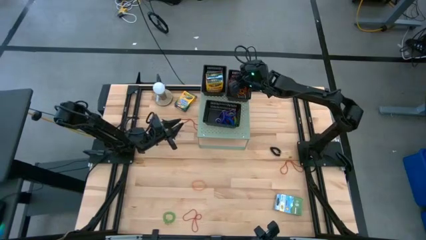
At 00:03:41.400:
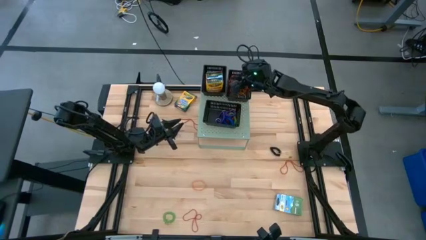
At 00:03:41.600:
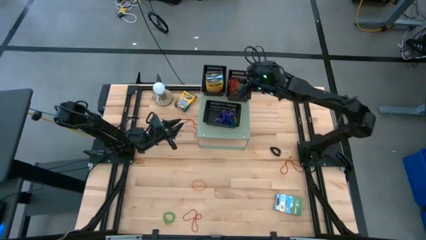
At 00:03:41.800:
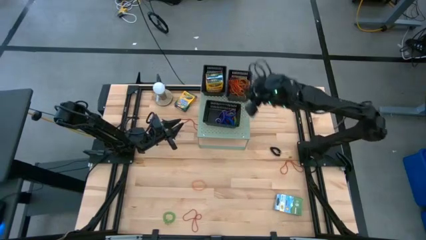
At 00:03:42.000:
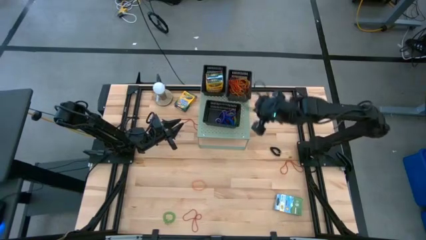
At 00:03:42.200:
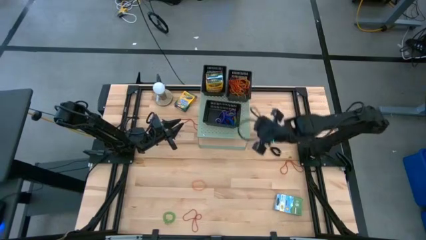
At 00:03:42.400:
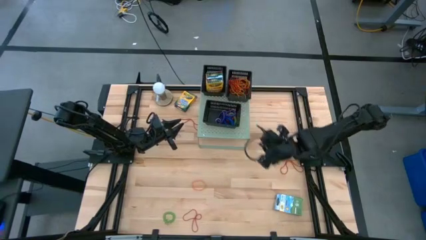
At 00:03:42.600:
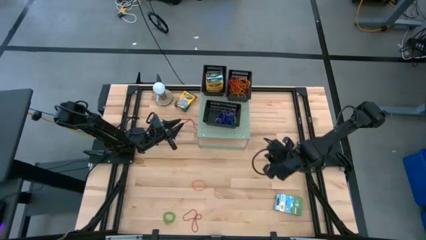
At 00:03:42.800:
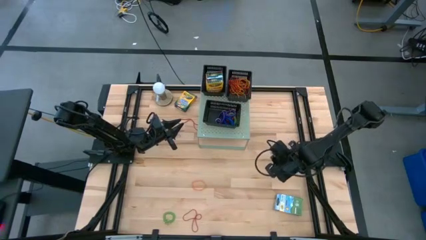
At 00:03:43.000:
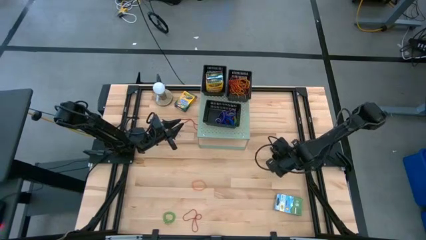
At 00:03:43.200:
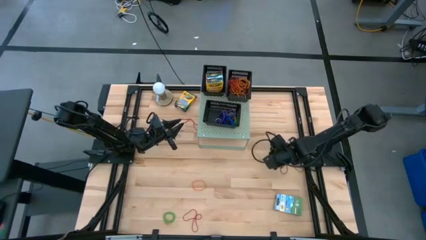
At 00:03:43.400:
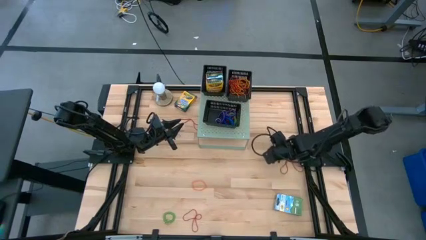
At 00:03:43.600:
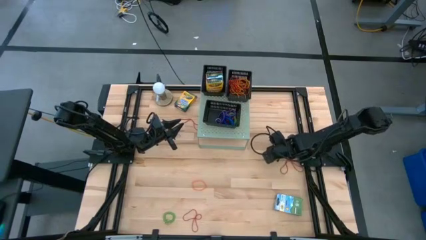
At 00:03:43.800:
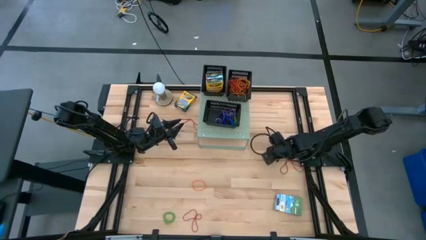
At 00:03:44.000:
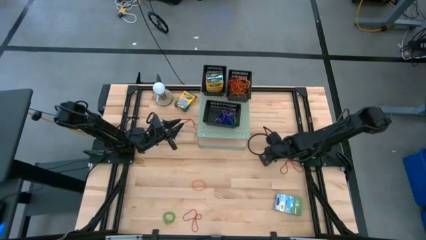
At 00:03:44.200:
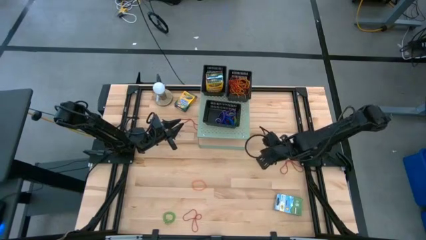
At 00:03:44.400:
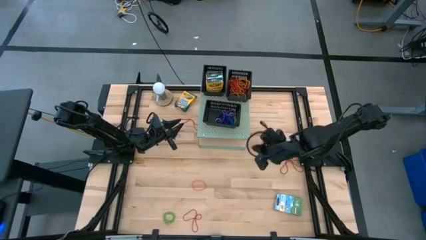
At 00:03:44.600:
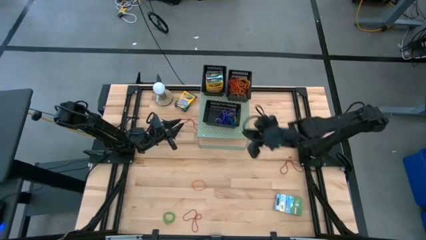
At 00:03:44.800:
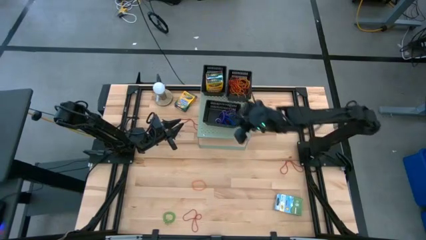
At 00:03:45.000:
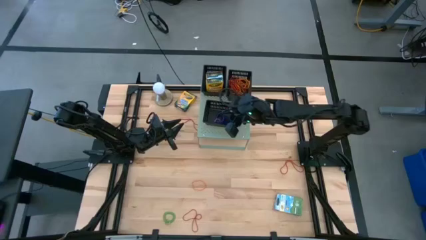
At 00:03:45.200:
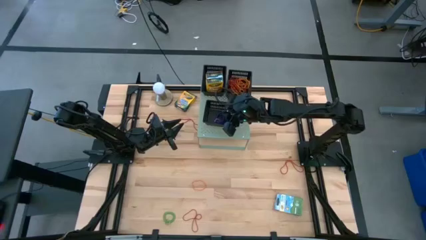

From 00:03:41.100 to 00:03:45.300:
Task: Pick & Place Office Desk Supplies
Put the black spring keychain into the bottom black bin on the shelf

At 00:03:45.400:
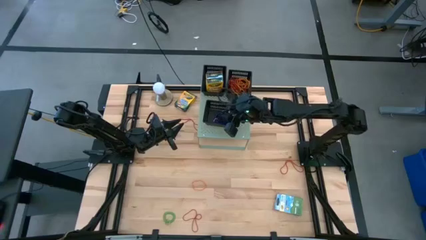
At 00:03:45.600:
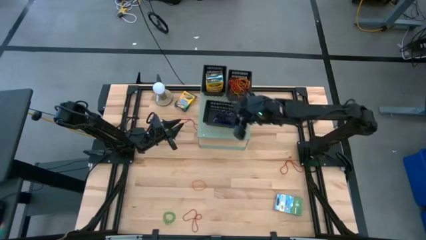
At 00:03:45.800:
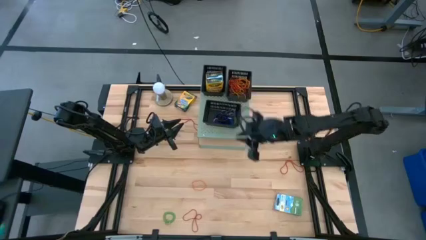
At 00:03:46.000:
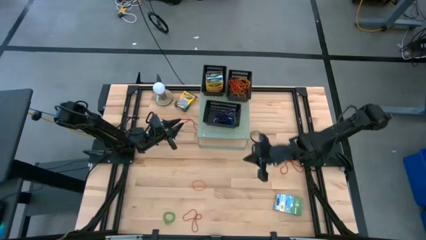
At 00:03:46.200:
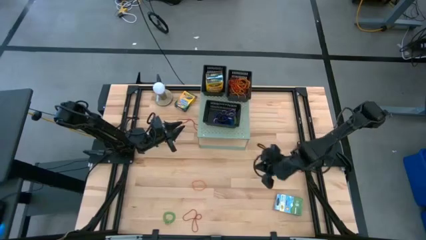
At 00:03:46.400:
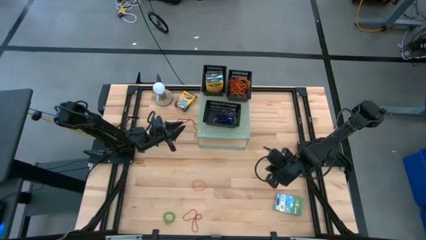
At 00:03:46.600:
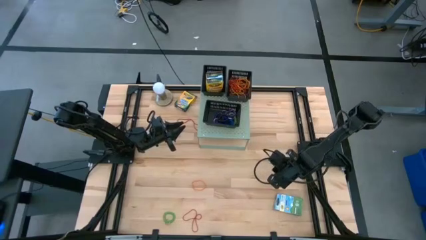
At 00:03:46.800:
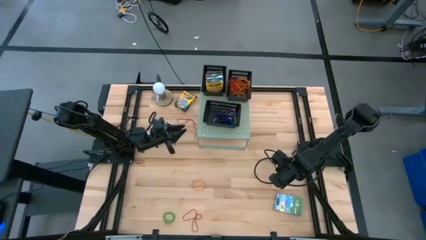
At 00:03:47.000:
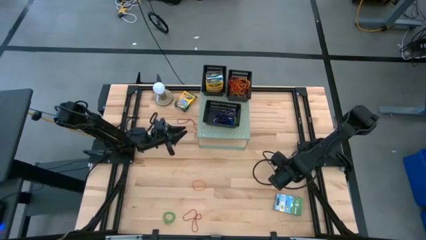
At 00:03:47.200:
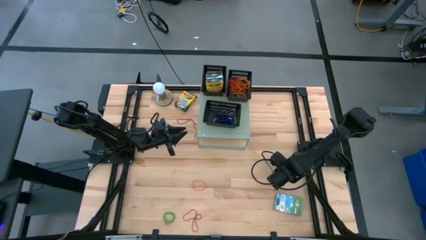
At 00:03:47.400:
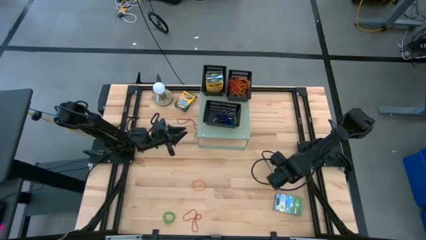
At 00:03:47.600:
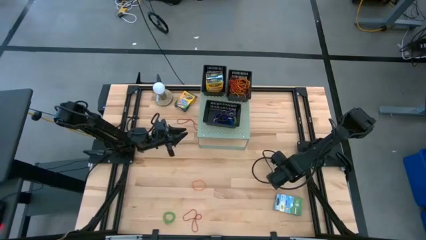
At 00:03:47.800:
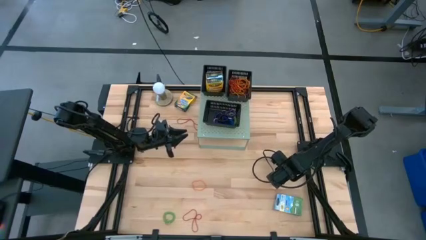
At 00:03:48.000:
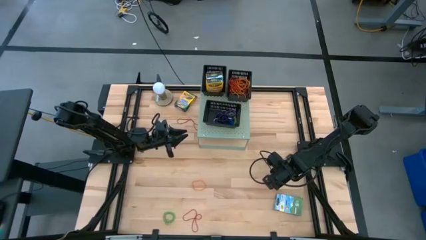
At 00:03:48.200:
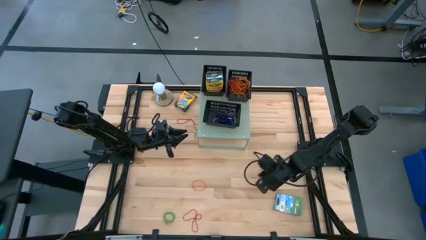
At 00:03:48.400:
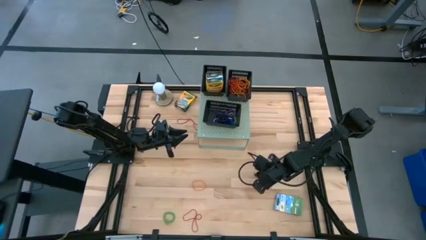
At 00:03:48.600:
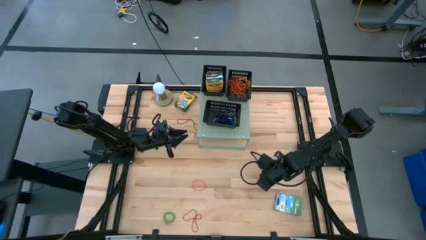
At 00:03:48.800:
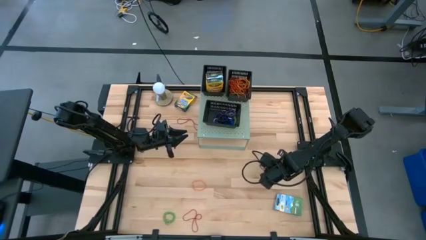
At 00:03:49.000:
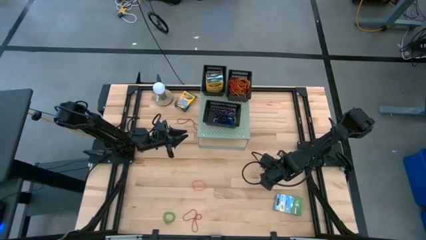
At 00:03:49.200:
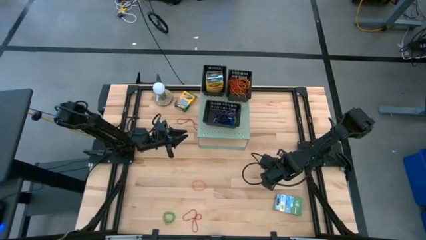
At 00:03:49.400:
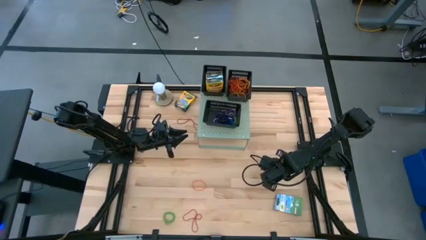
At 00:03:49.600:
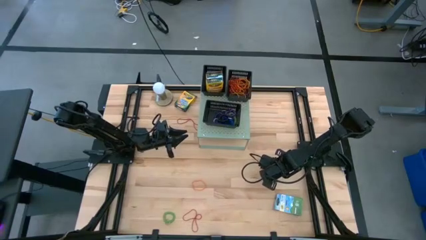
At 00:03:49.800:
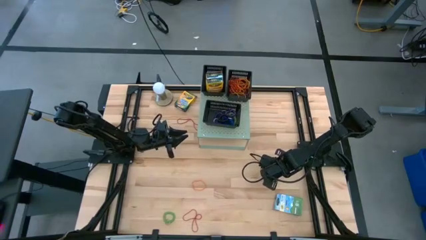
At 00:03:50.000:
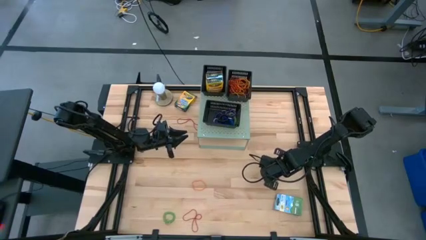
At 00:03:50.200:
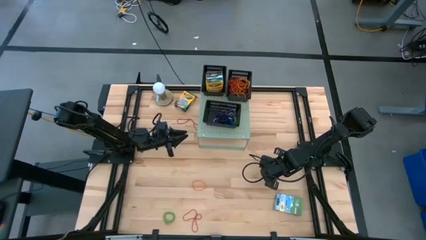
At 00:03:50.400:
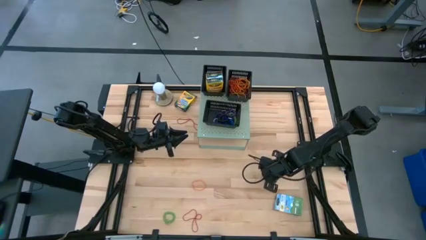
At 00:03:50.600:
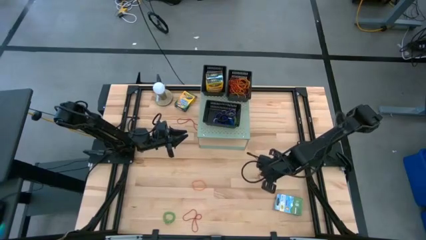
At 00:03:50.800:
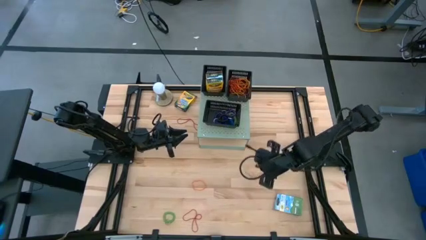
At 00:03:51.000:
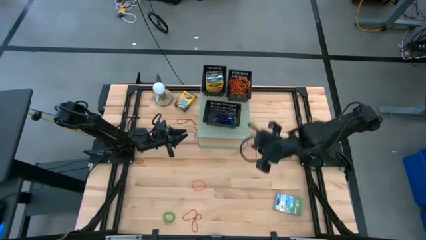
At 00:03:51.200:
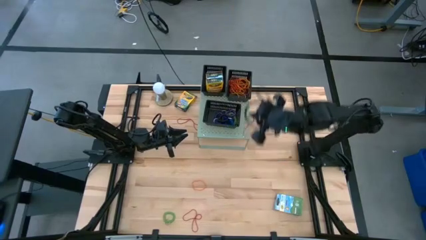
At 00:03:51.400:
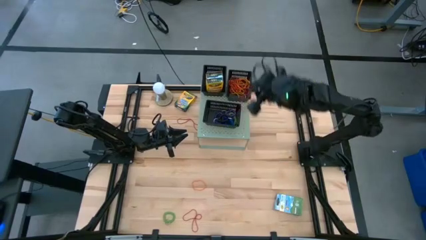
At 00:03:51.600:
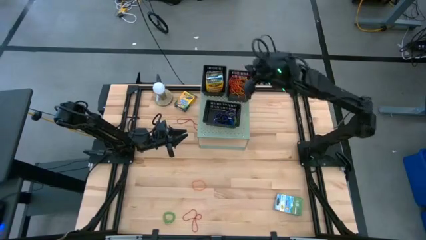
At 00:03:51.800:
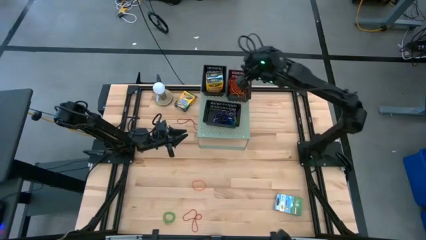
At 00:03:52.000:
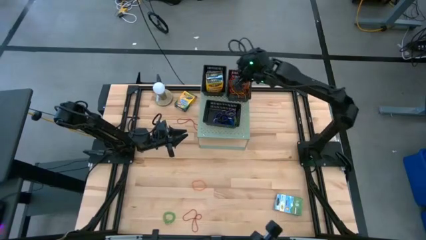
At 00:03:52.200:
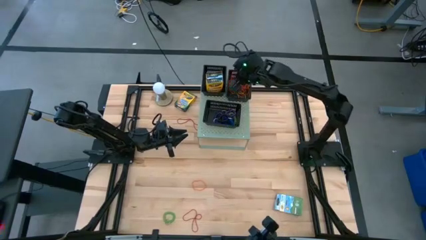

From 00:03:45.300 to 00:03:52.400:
Put the red rubber band into the top right black bin on the shelf

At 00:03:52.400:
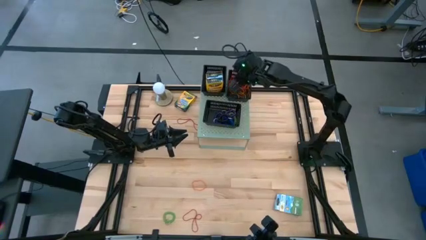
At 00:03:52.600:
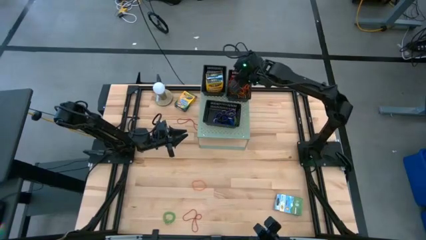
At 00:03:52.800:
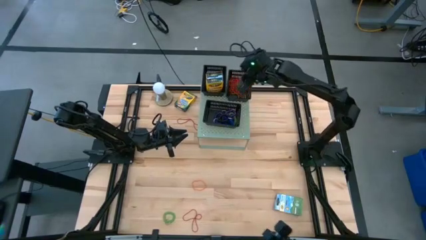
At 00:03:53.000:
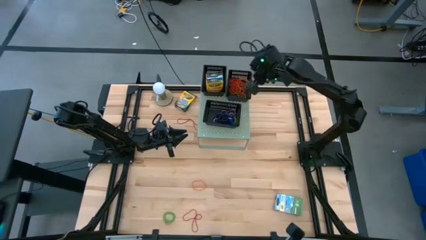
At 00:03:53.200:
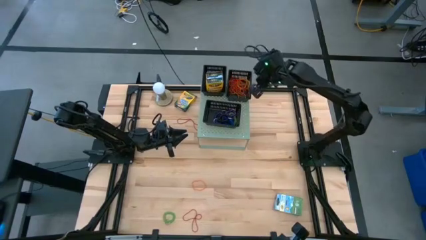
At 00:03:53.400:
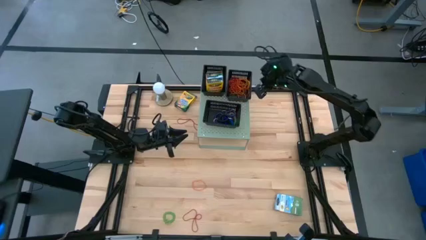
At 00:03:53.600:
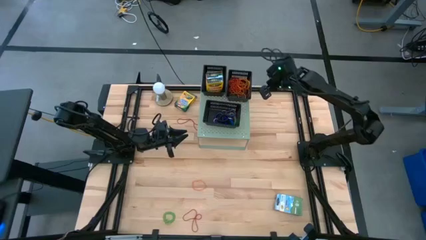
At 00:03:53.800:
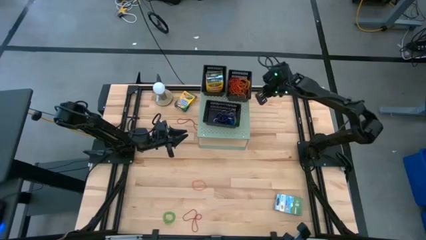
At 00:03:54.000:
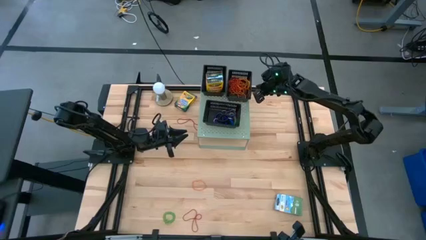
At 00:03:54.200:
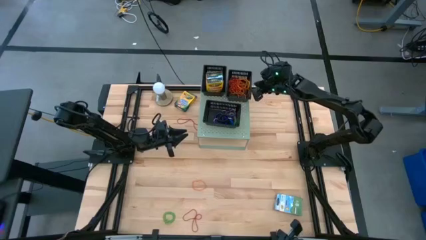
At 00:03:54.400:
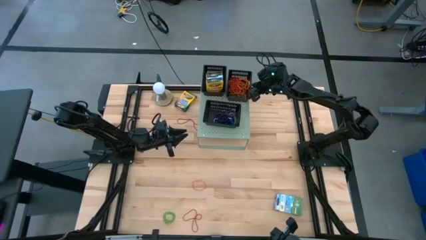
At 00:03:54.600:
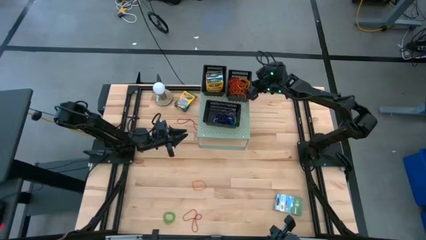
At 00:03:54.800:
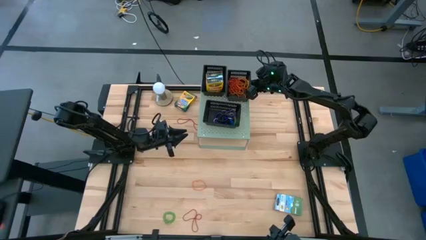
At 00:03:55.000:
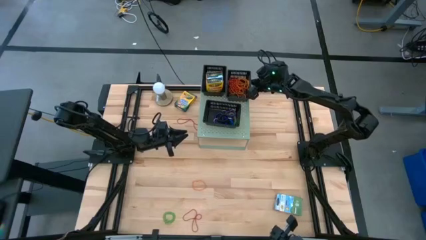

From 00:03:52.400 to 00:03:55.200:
Adjust the top right black bin on the shelf
